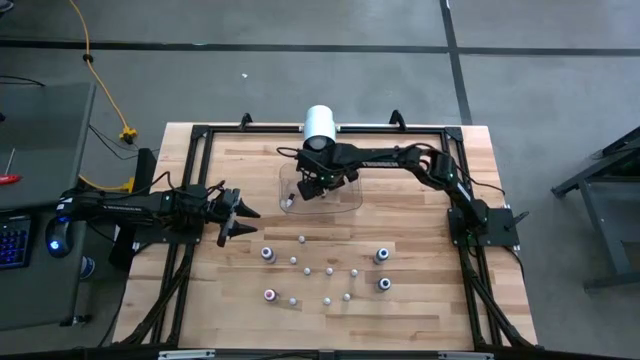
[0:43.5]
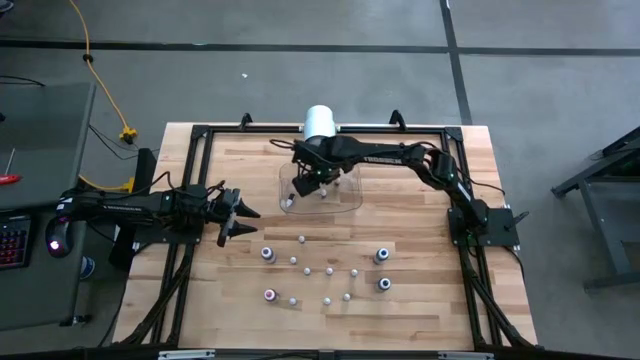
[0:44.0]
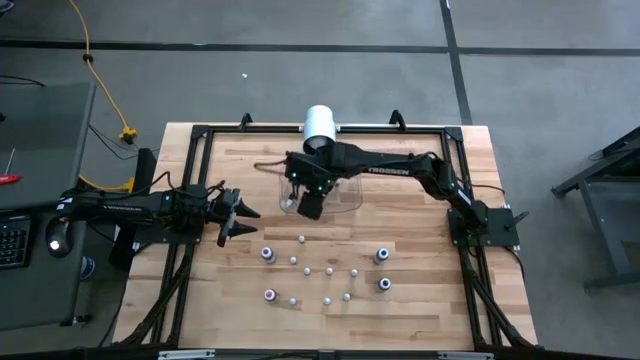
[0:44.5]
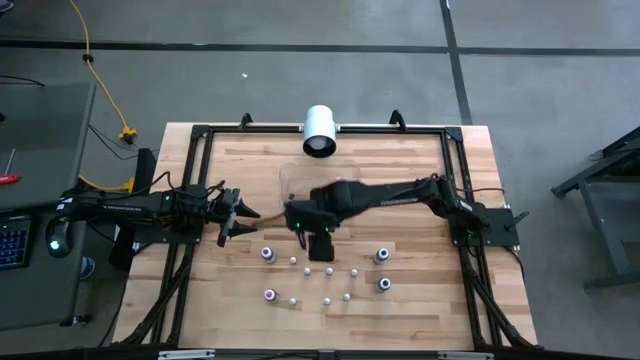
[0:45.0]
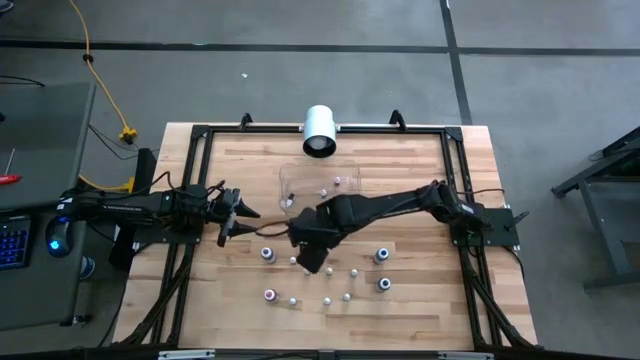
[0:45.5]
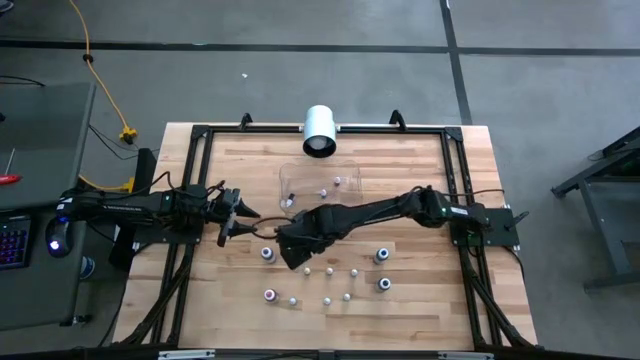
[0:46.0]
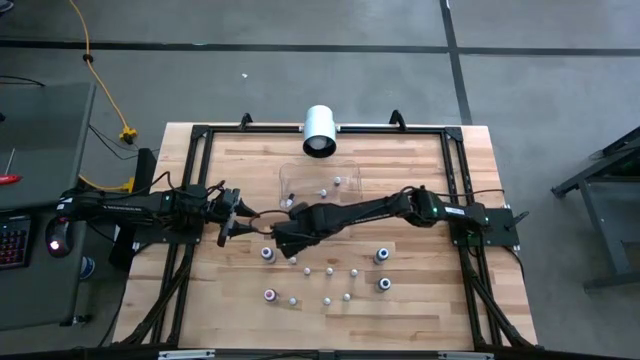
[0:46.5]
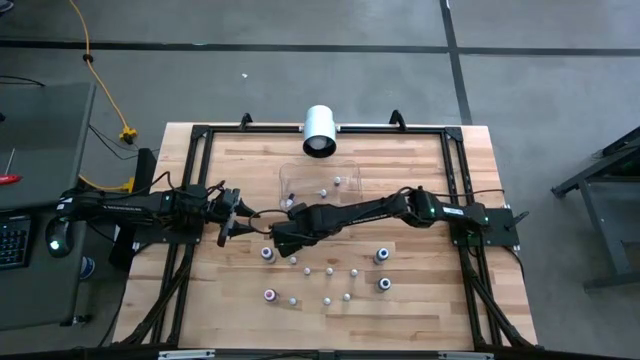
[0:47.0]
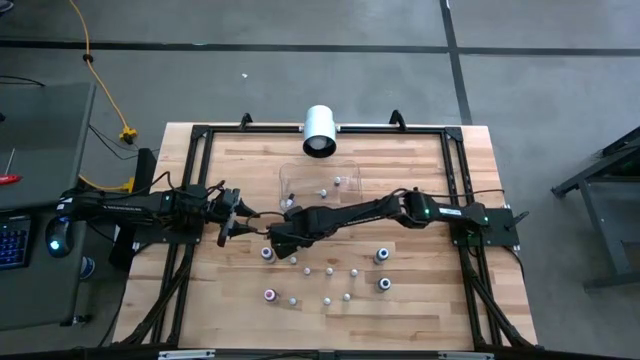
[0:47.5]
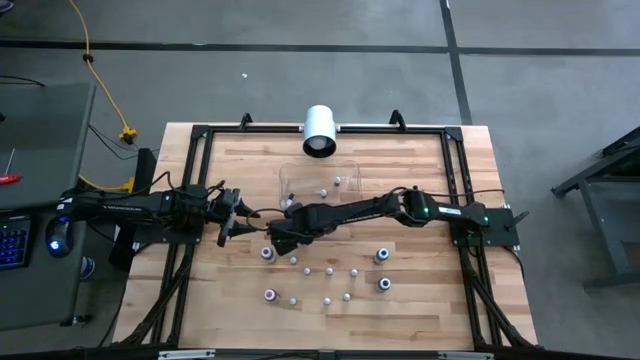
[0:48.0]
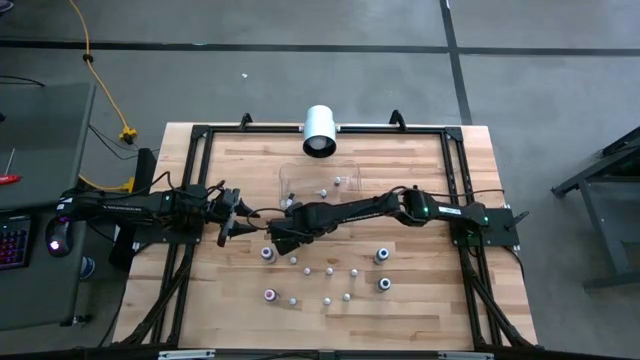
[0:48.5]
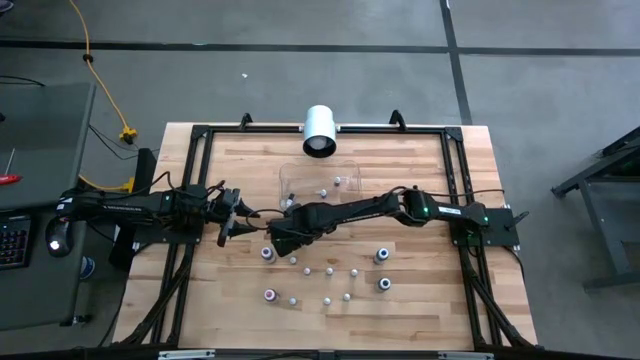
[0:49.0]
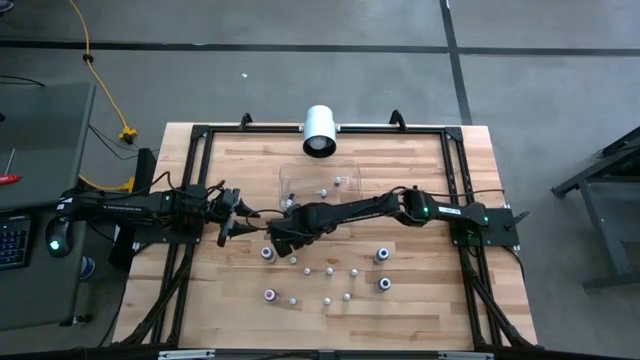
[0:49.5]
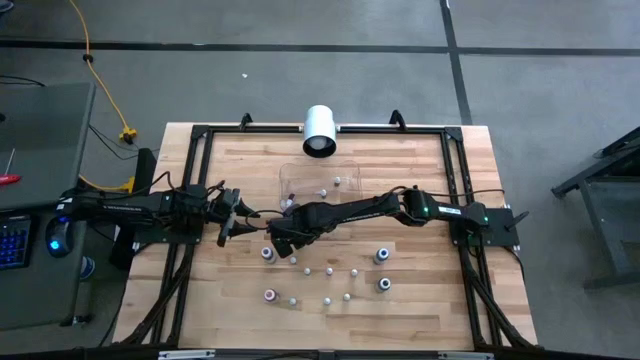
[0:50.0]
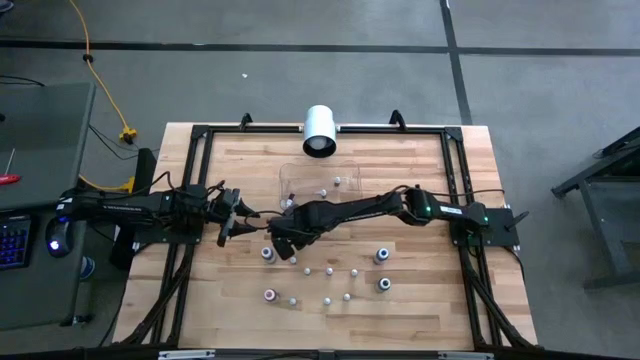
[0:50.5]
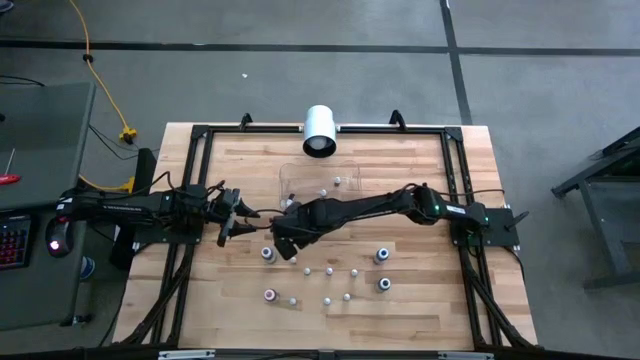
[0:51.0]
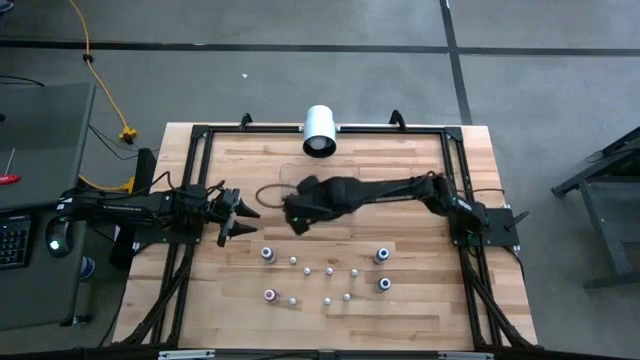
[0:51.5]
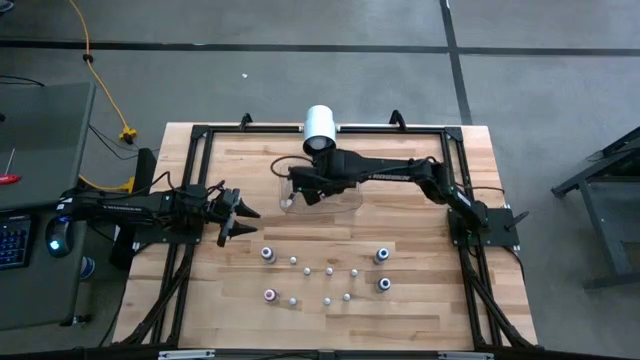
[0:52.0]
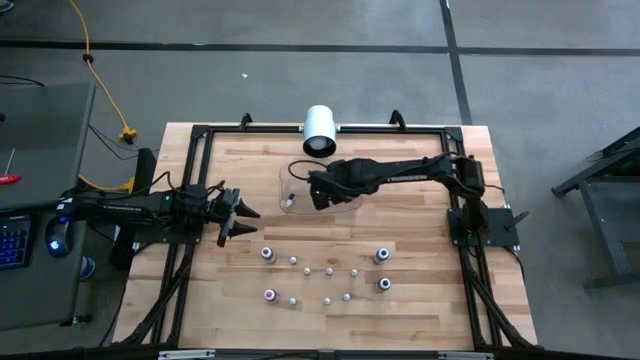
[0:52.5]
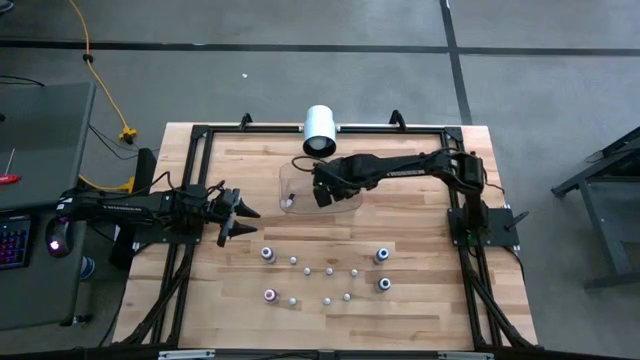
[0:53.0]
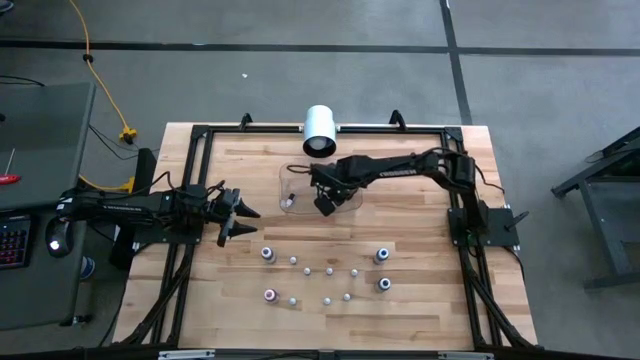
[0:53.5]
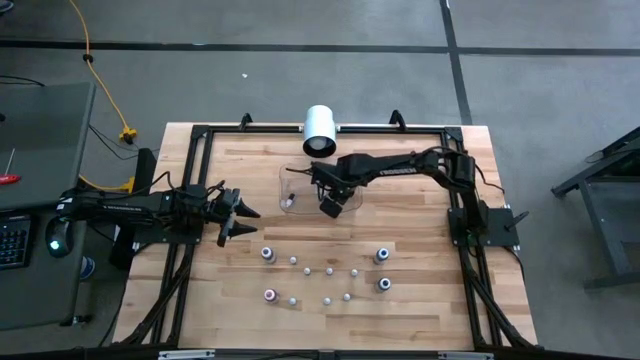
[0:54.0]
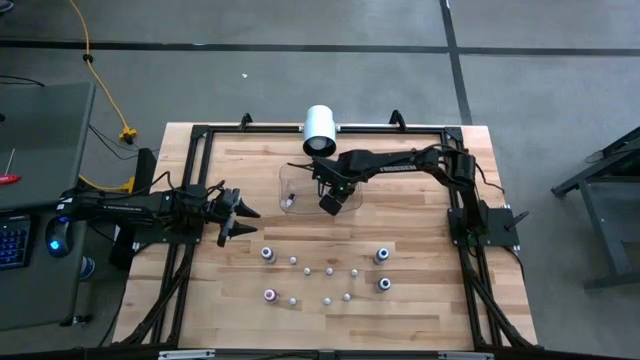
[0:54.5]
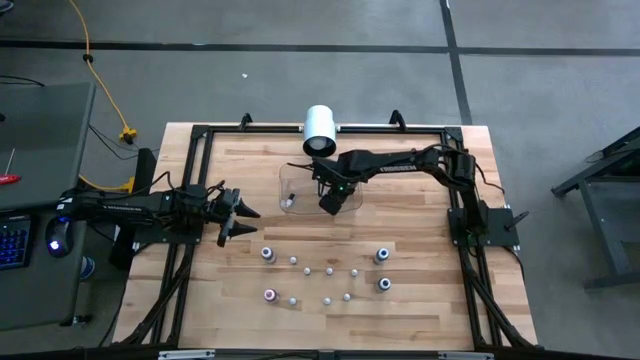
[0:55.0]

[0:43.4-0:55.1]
Task: Pick & Place food coloring
Put the small black food coloring bottle into the transparent bin

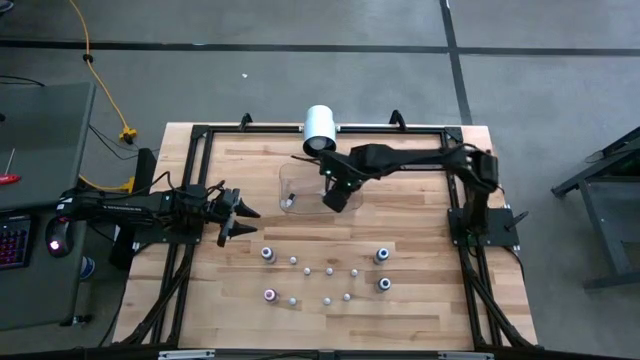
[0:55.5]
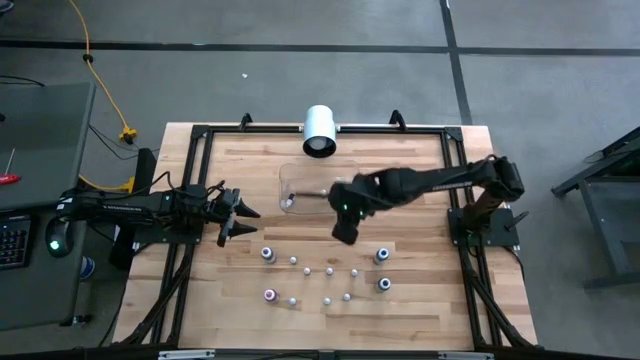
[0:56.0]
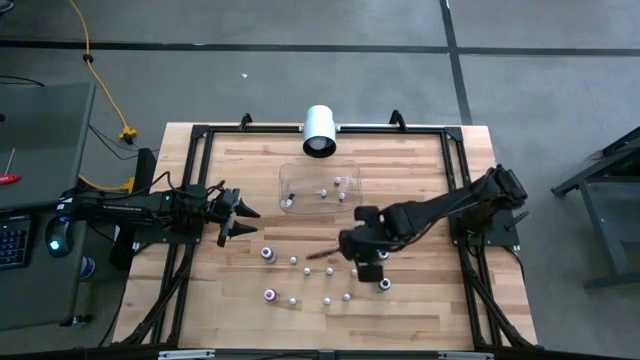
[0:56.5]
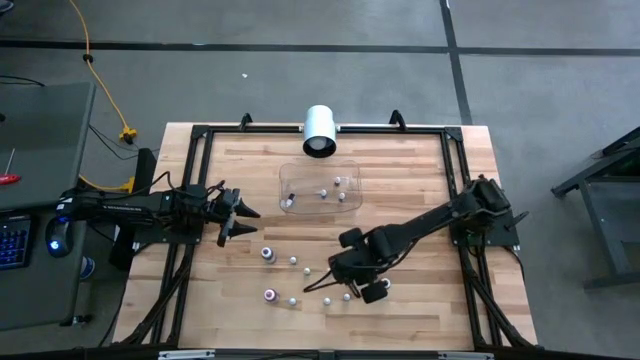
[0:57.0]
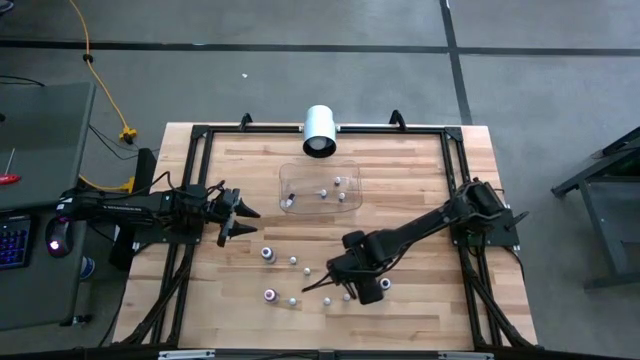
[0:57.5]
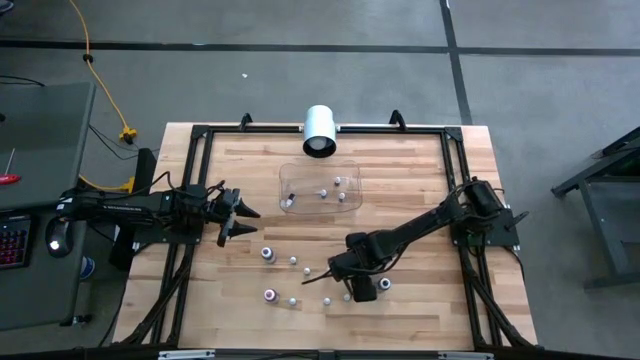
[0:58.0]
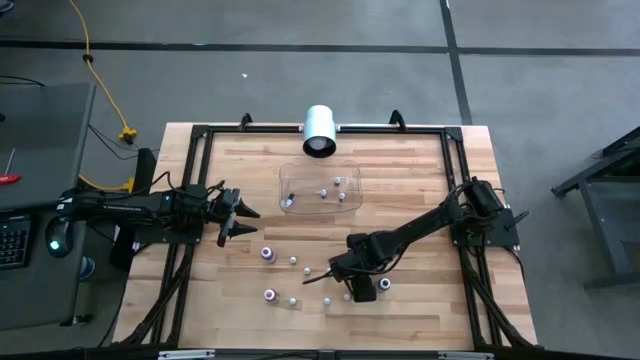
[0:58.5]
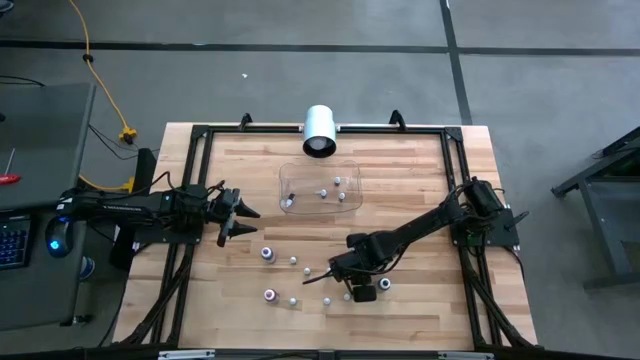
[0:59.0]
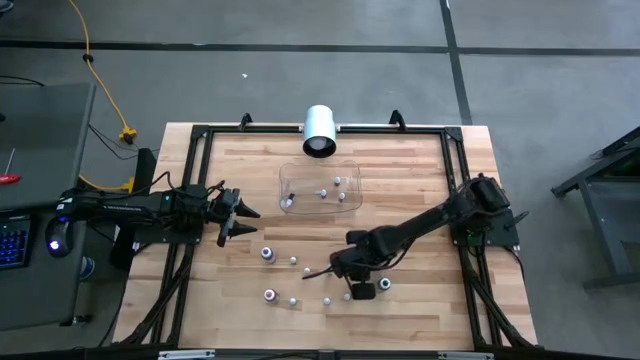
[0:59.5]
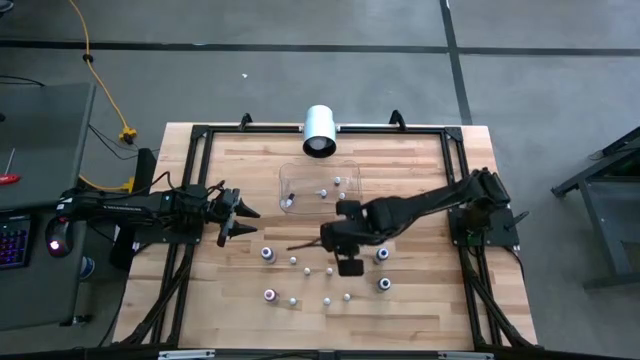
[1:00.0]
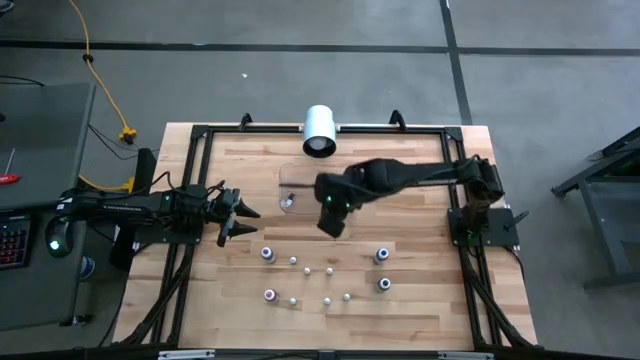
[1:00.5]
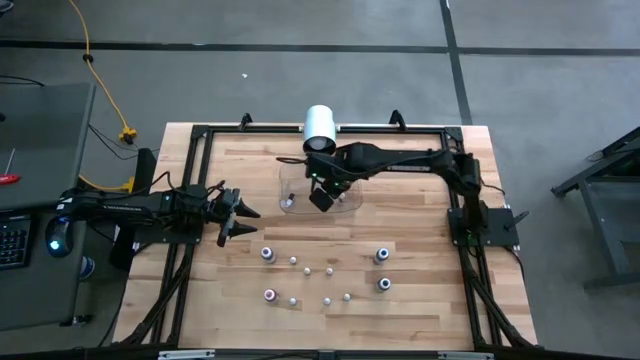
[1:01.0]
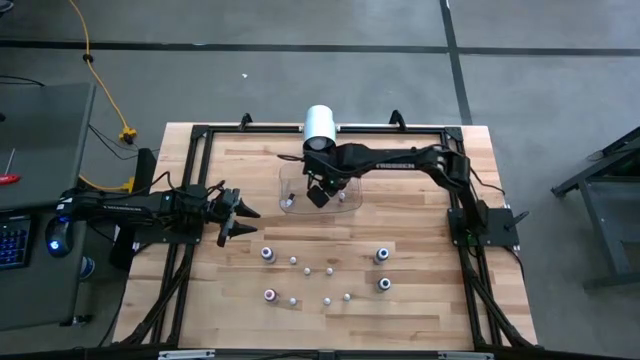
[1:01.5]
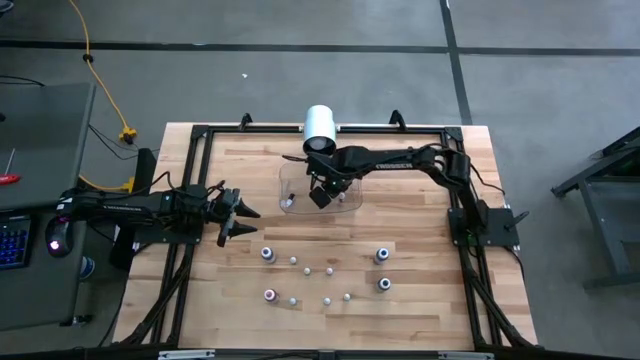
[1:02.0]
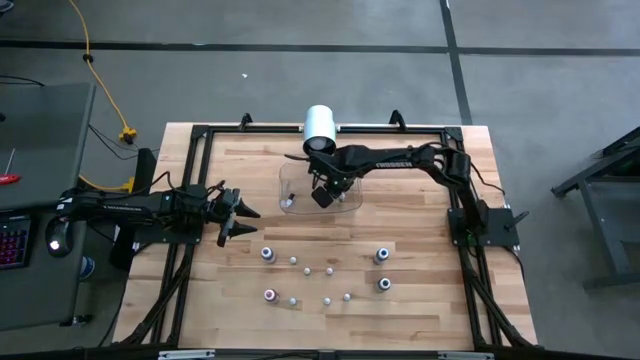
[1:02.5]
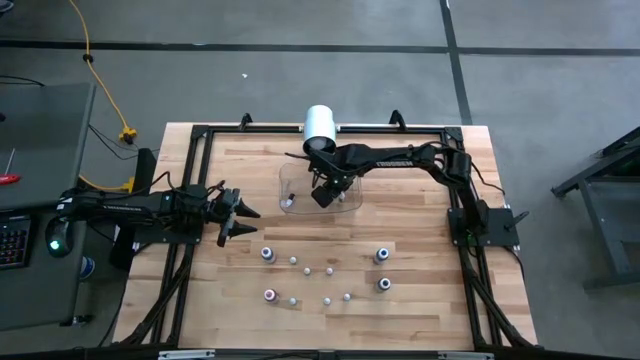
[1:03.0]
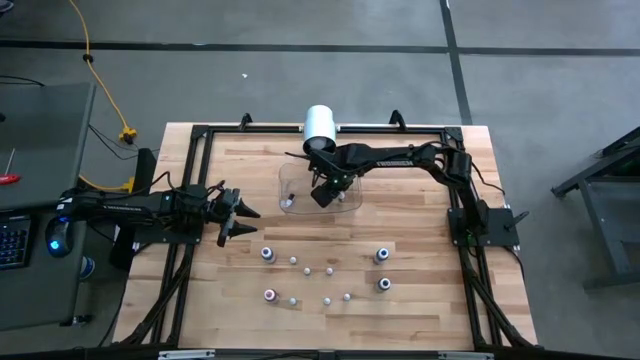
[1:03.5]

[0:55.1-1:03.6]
Put the small green food coloring bottle into the transparent bin

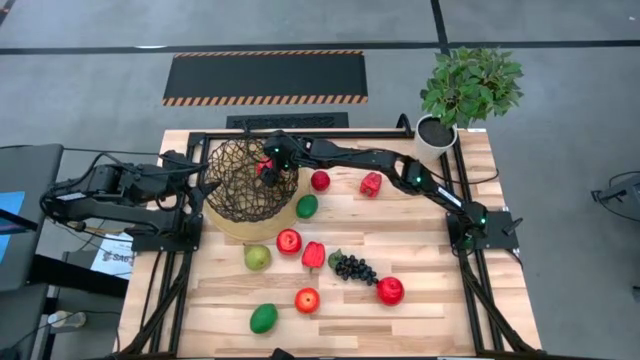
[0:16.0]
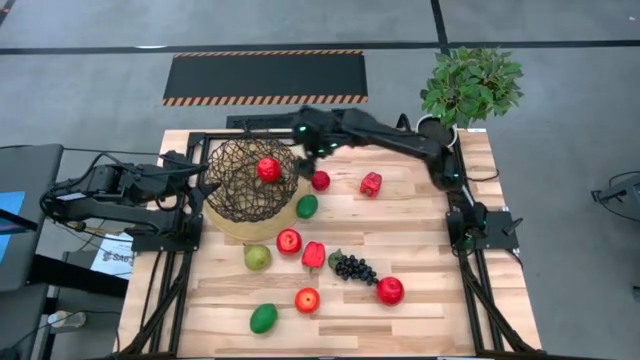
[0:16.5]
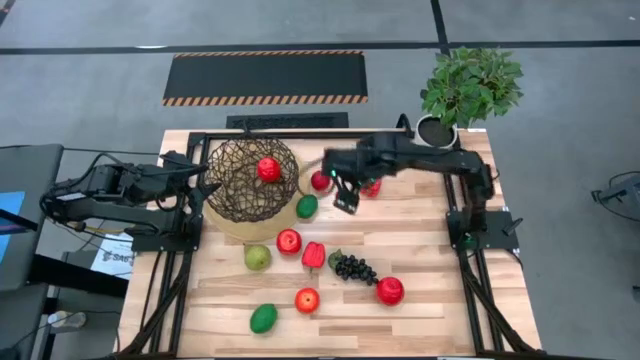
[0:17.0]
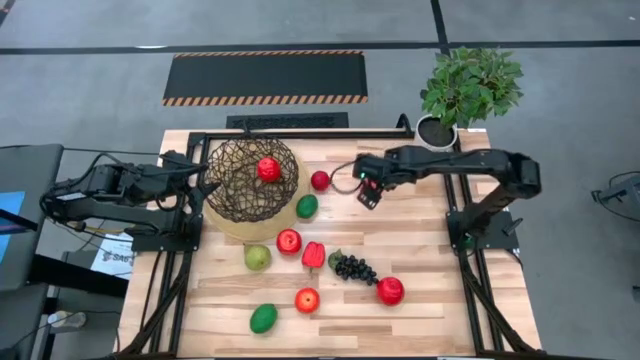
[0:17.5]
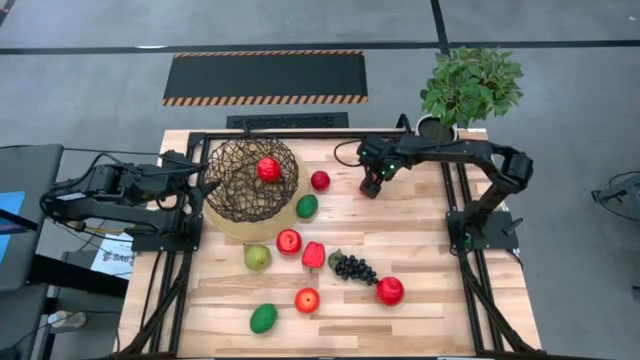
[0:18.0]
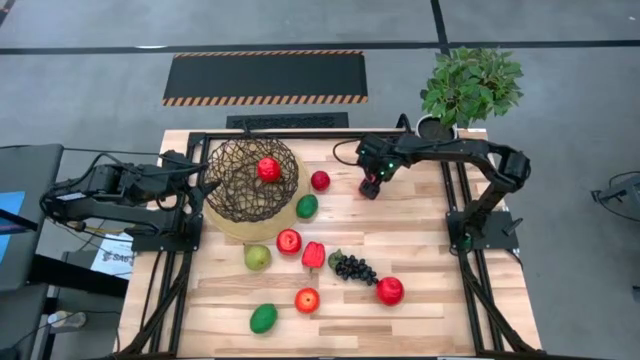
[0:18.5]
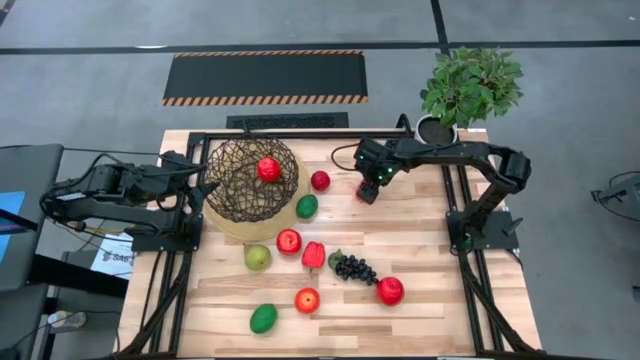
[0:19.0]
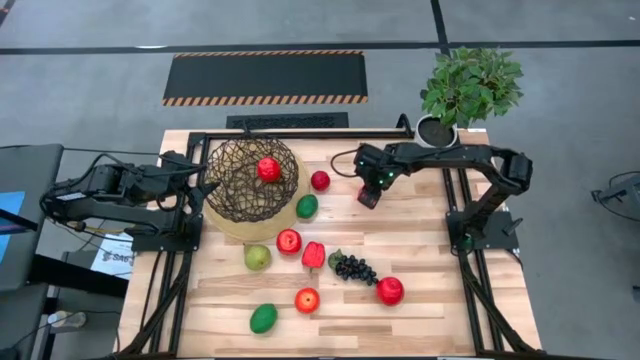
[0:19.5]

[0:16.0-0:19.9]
Task: Build produce basket
Put the red bell pepper into the black wire basket
